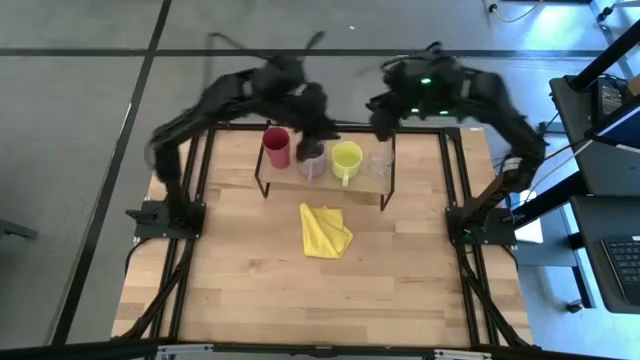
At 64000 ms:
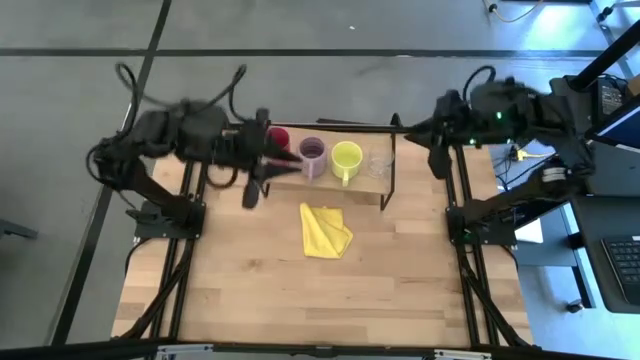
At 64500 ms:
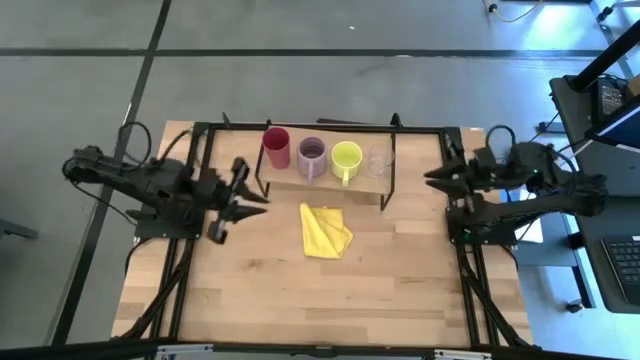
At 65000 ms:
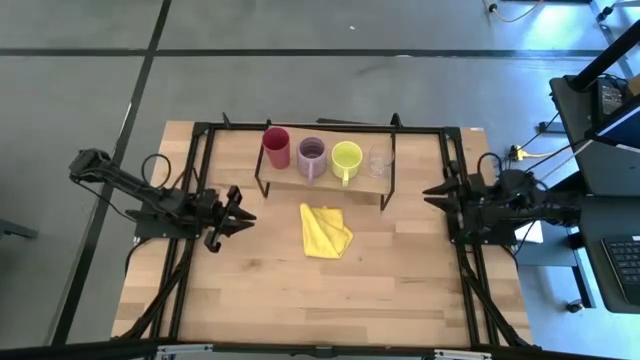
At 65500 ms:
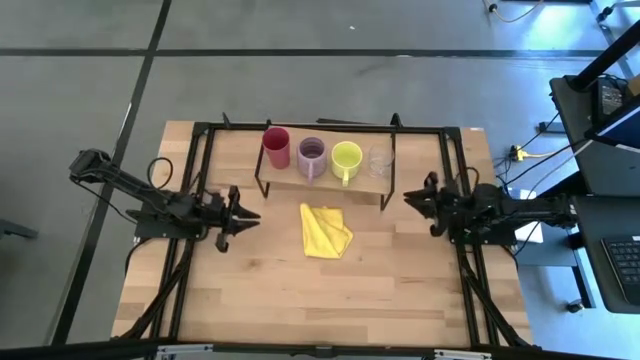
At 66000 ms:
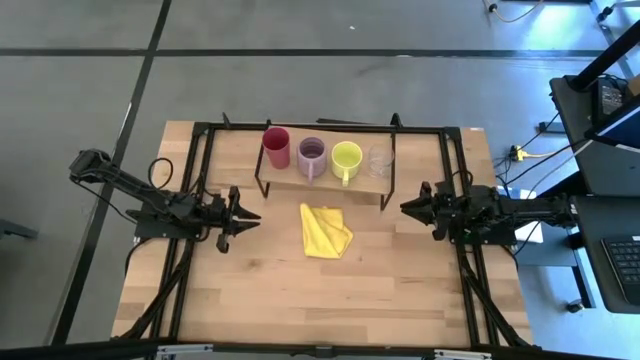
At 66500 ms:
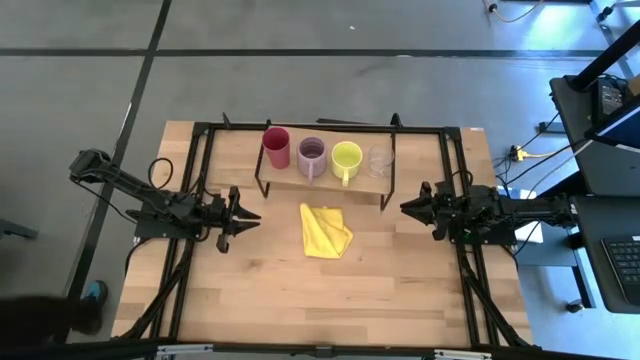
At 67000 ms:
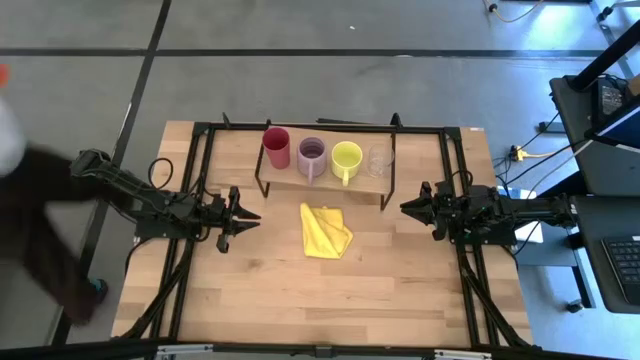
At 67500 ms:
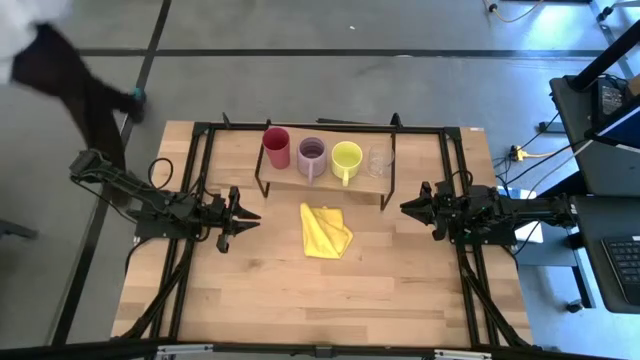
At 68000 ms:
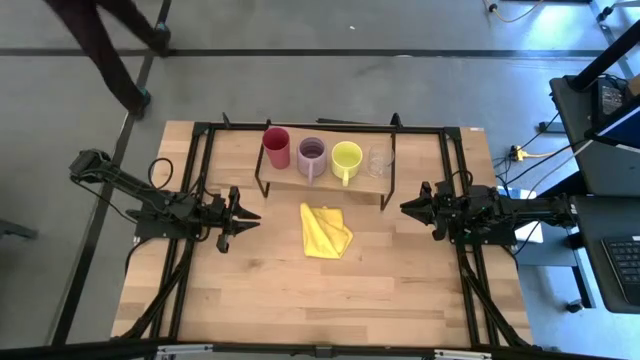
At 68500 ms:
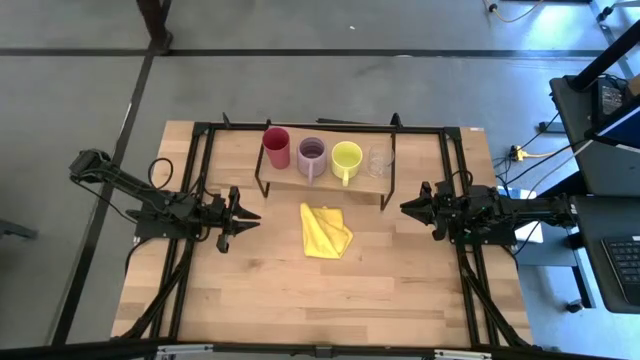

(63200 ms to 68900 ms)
Task: Stack small to large cups/mugs on shelf
Return to Home Position

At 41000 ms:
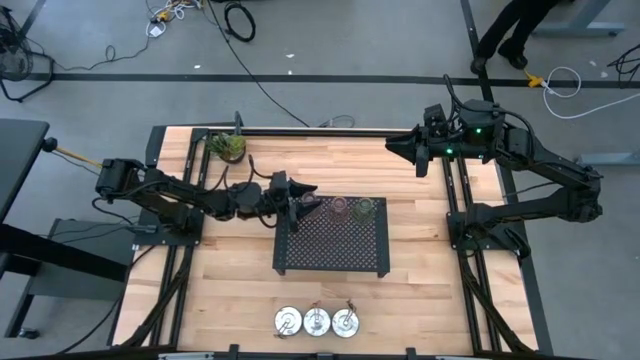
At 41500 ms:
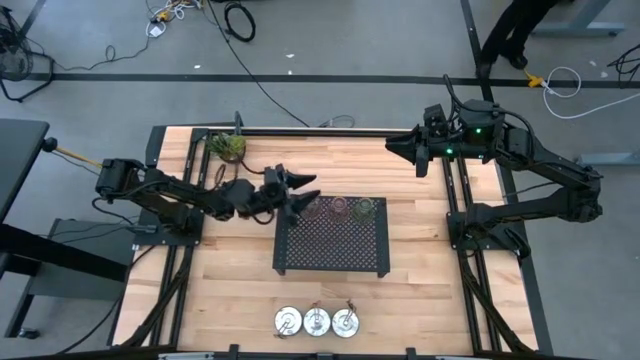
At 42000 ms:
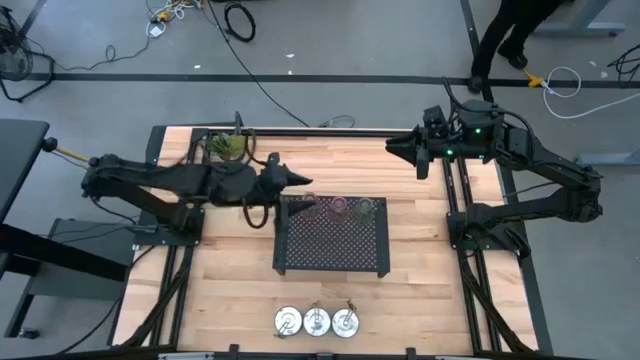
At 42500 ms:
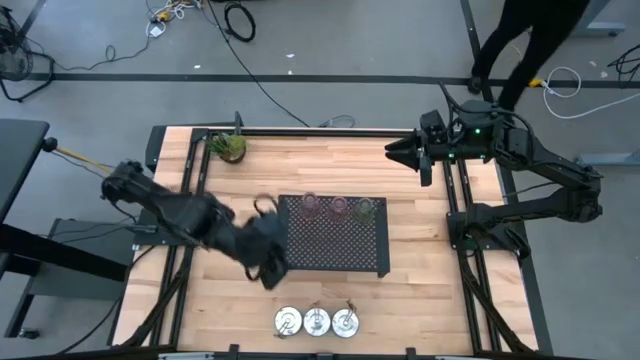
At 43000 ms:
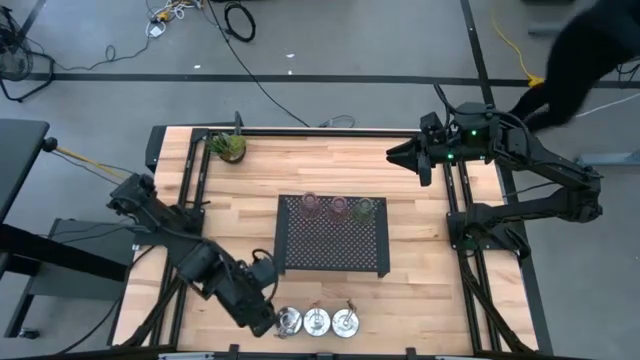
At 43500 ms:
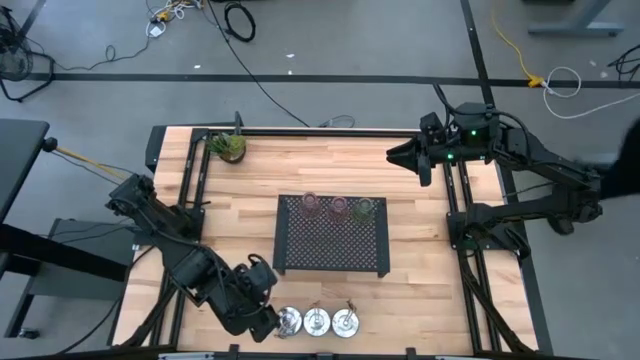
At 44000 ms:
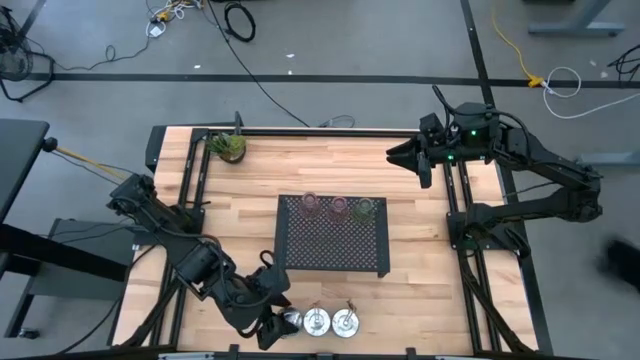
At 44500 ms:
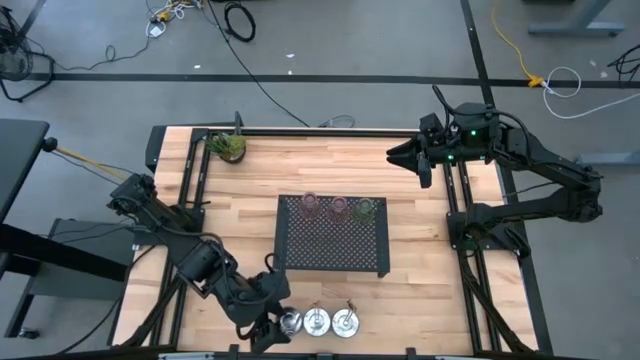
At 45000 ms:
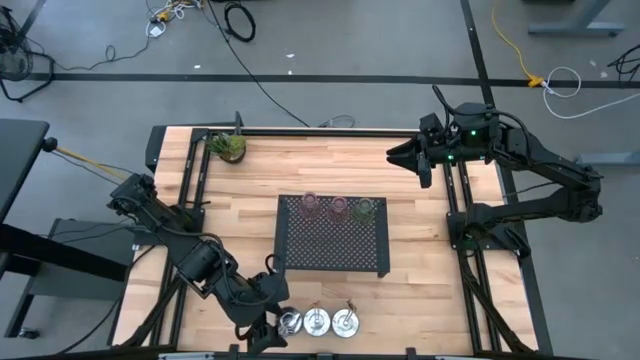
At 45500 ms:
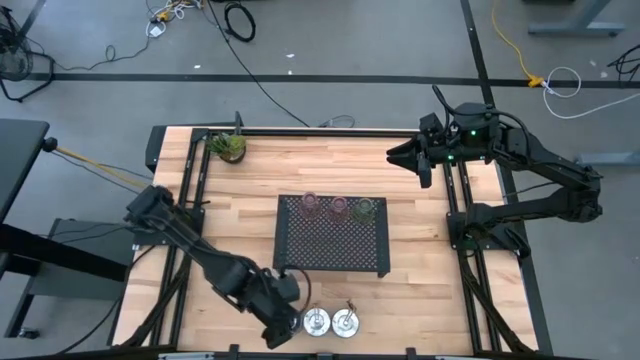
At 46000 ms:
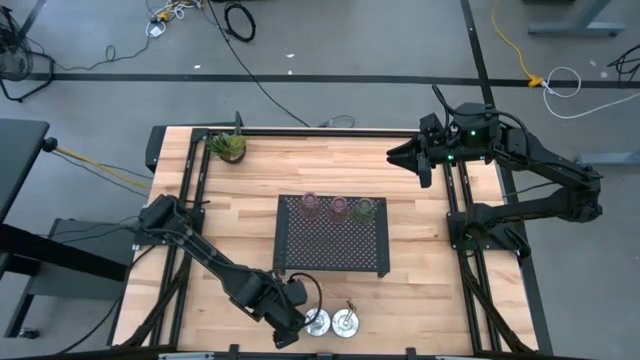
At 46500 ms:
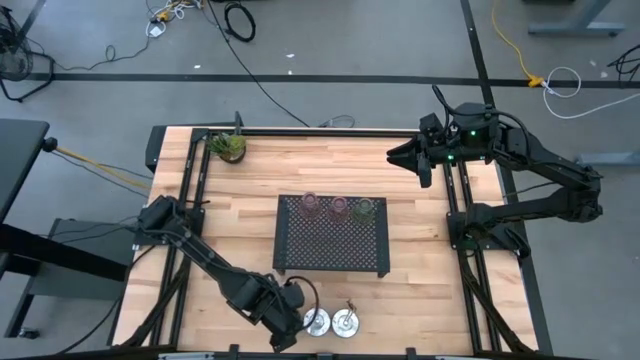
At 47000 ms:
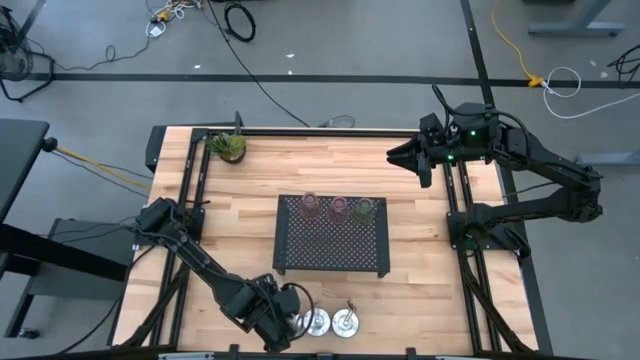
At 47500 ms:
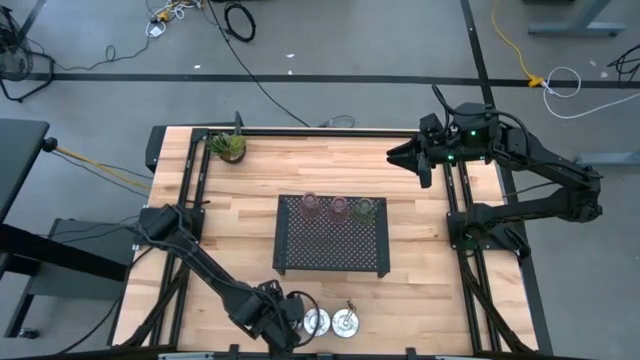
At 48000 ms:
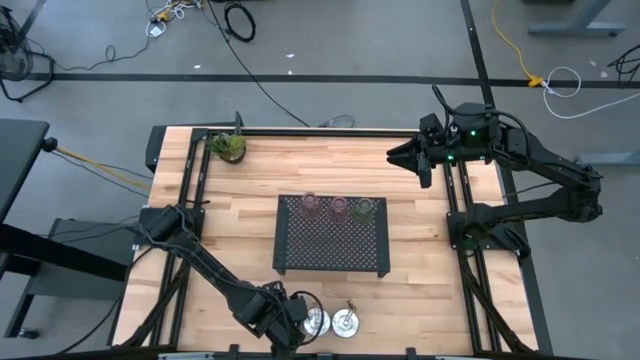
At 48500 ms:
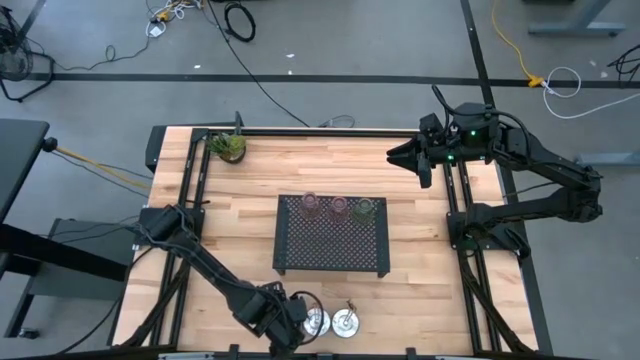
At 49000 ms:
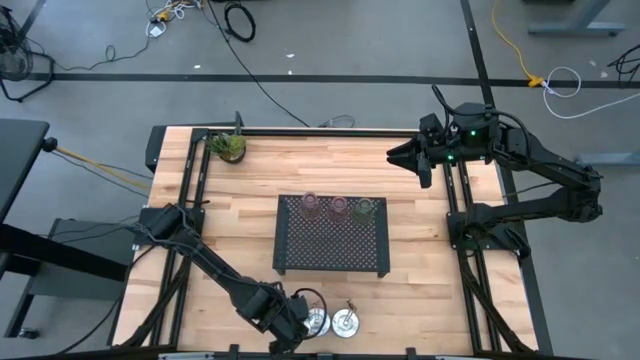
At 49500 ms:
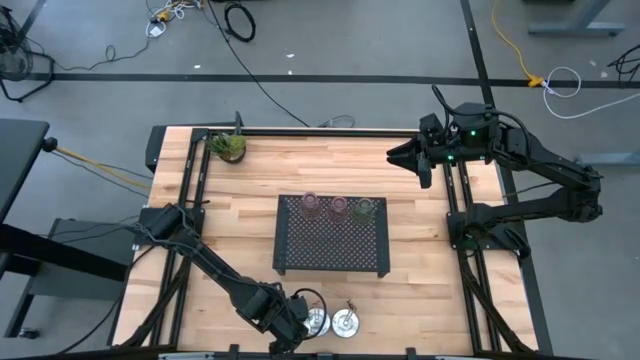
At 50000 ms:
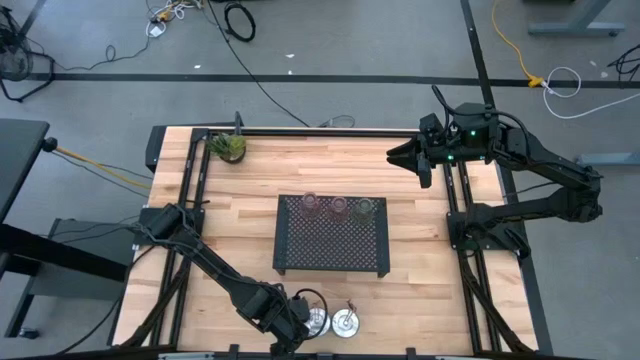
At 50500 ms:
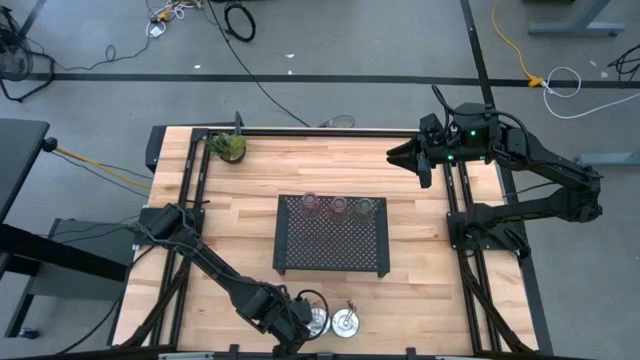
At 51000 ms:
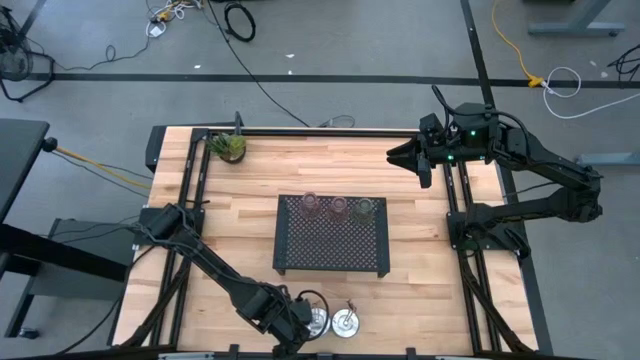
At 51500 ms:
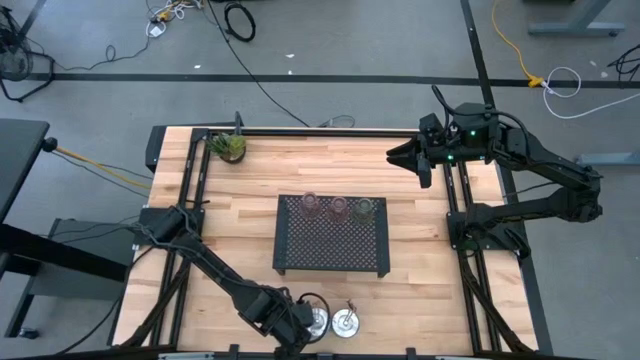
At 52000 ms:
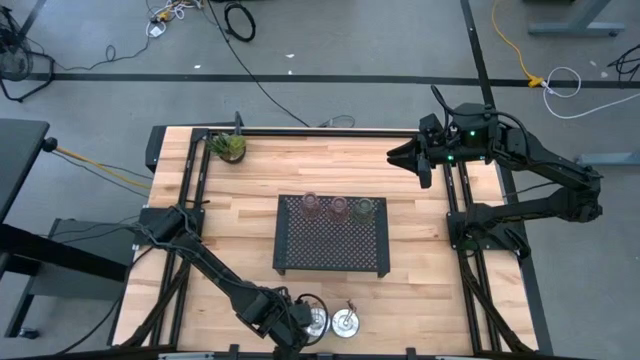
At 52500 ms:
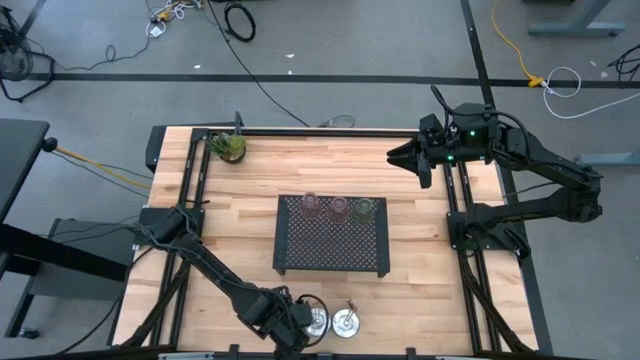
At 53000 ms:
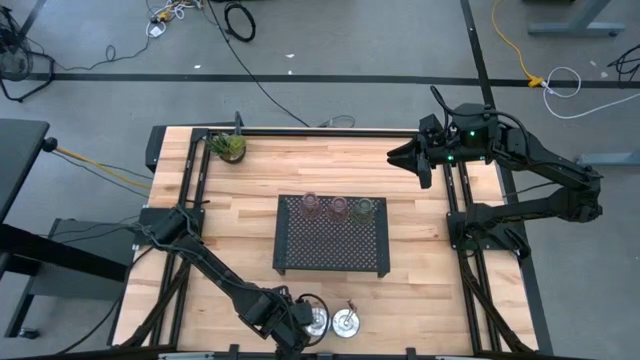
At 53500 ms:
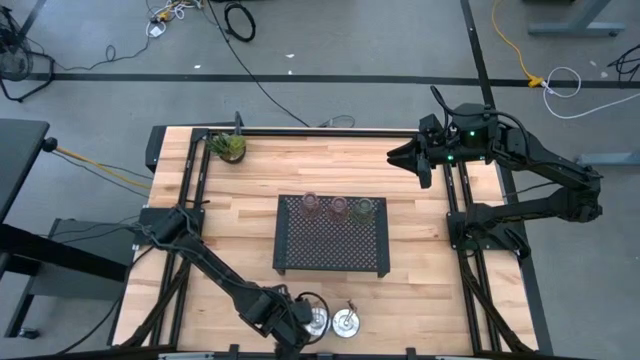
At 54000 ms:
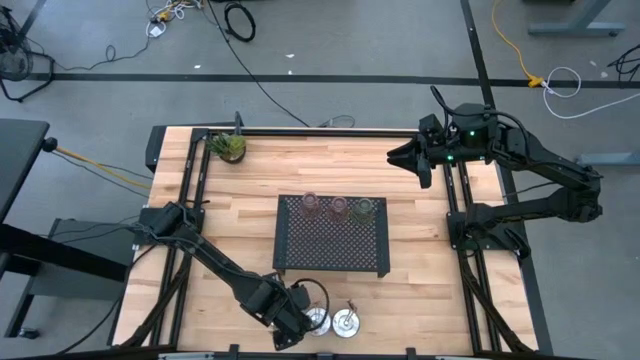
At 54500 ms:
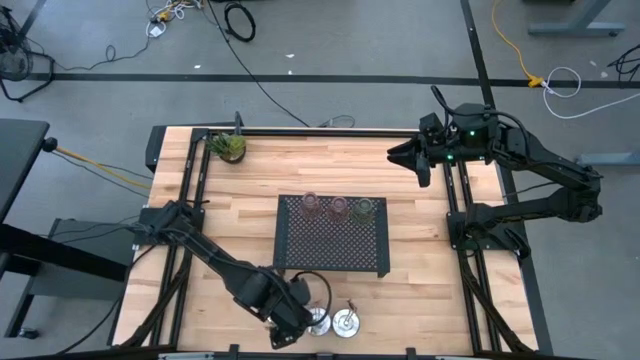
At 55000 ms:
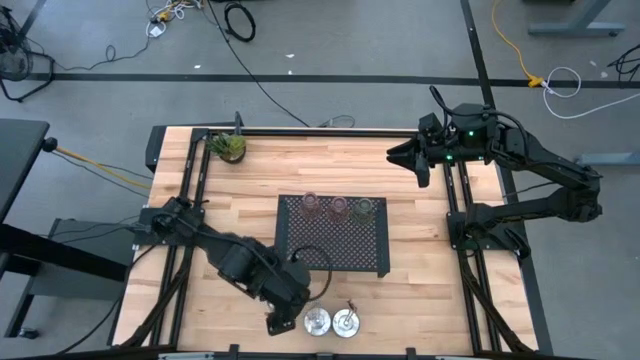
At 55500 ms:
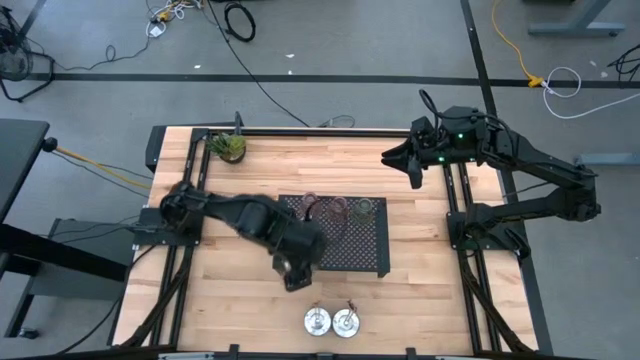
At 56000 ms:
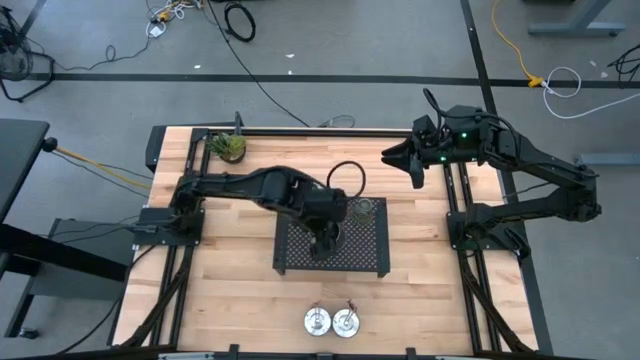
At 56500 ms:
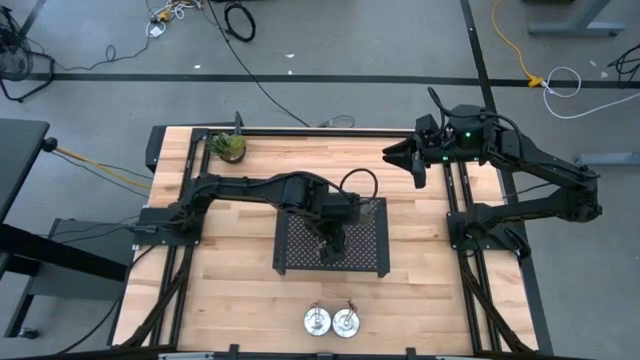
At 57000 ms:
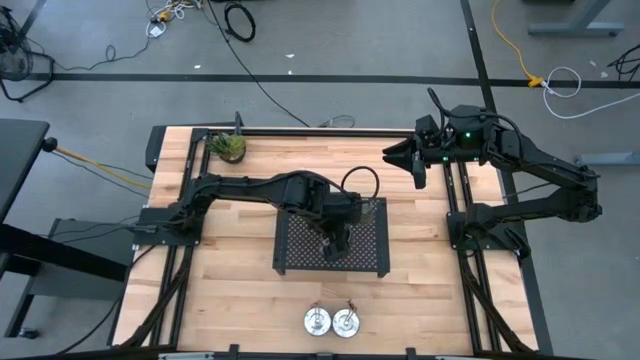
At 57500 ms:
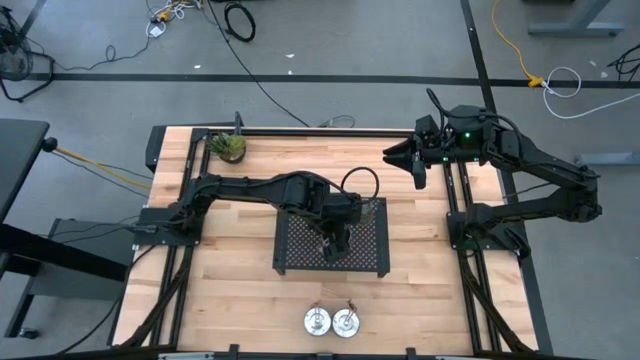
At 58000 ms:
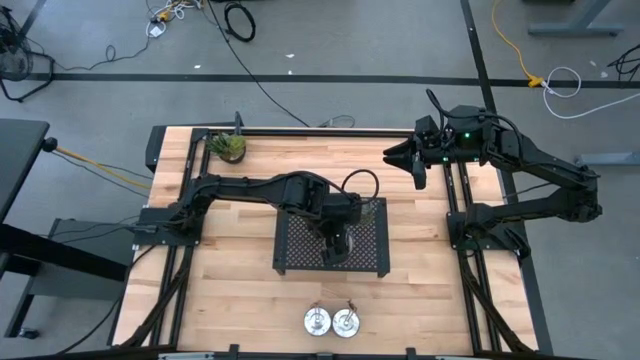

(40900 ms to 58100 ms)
Task: Pick & Place candle stick holders
Put the left silver scented candle on the shelf
